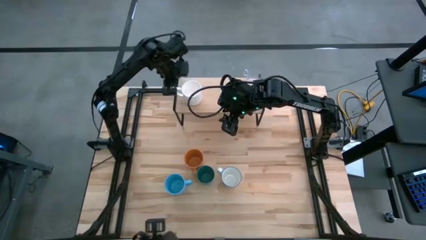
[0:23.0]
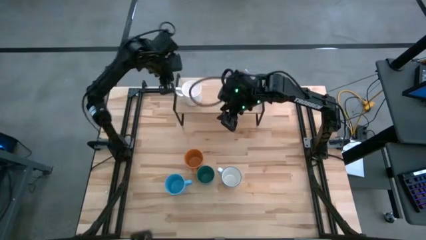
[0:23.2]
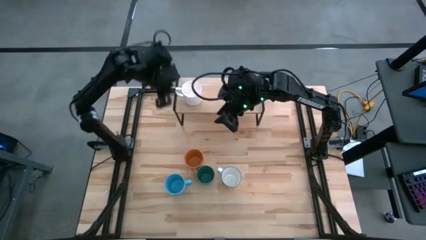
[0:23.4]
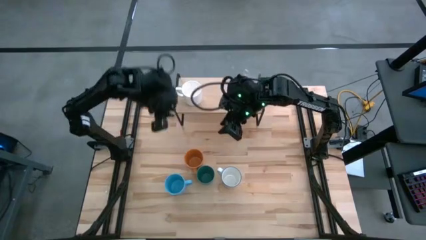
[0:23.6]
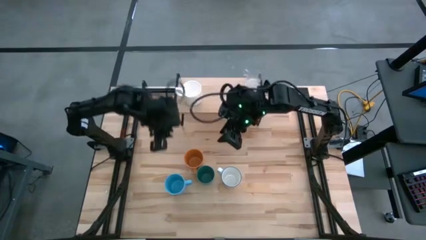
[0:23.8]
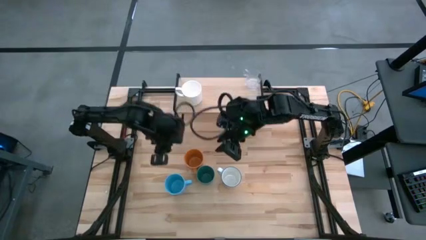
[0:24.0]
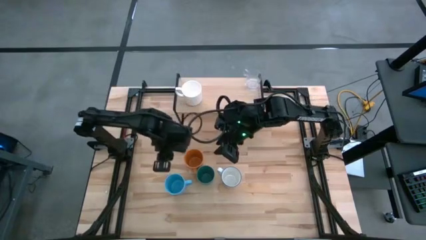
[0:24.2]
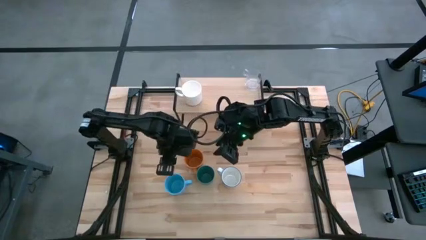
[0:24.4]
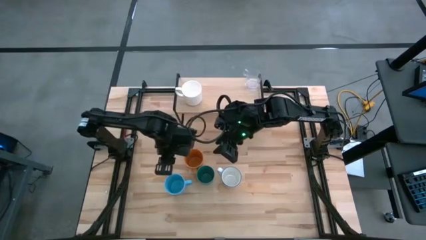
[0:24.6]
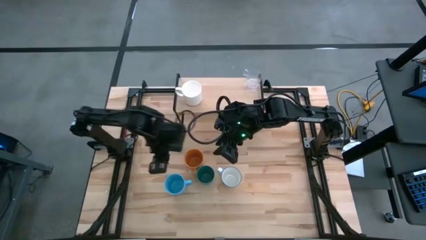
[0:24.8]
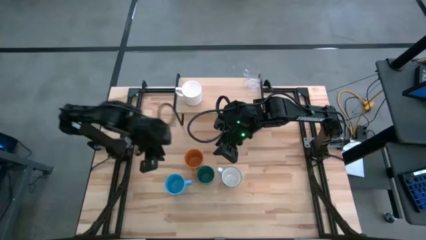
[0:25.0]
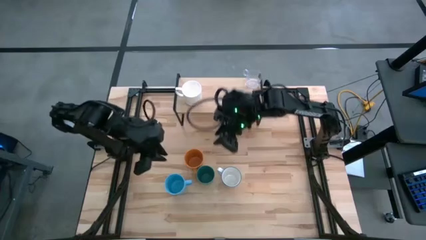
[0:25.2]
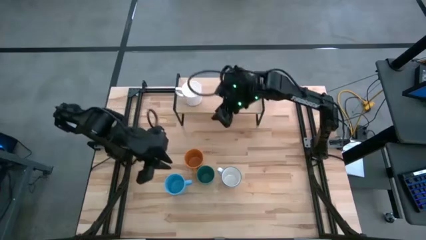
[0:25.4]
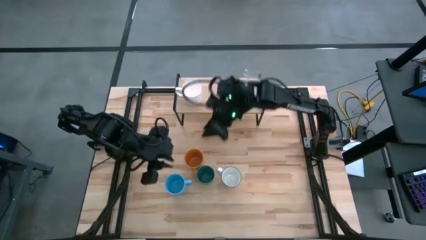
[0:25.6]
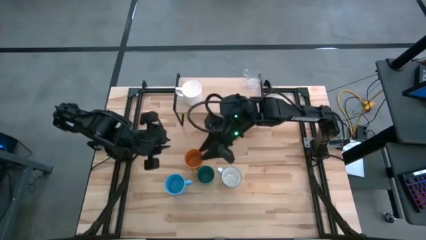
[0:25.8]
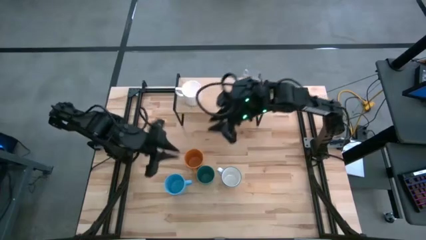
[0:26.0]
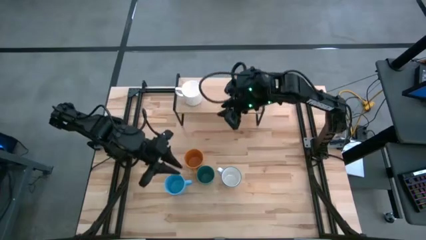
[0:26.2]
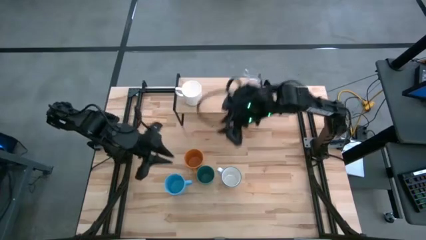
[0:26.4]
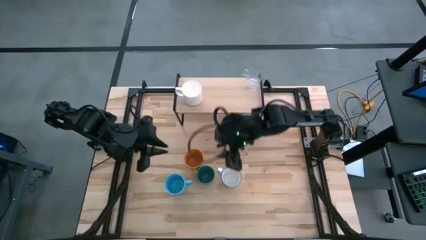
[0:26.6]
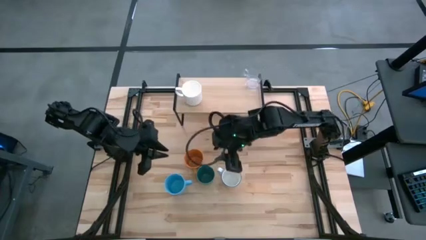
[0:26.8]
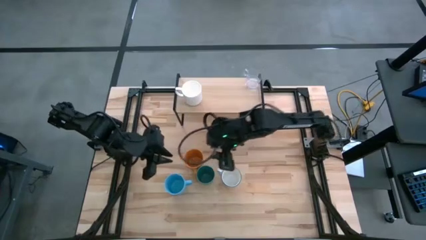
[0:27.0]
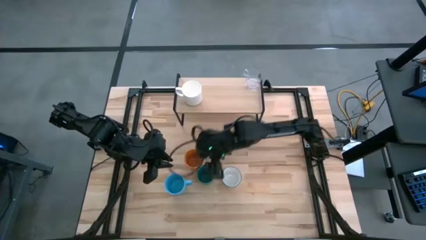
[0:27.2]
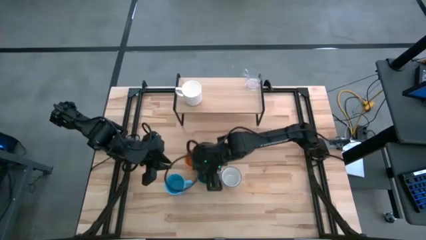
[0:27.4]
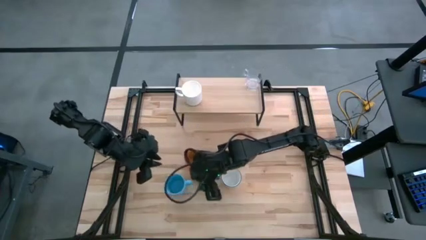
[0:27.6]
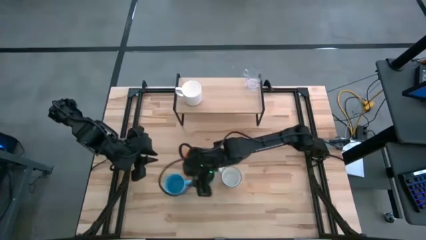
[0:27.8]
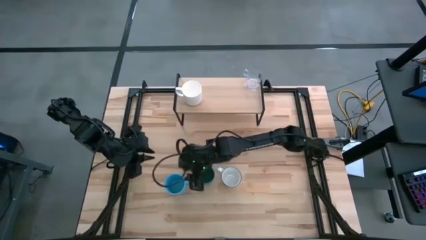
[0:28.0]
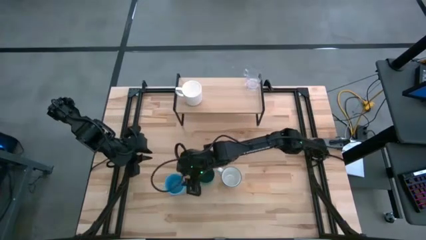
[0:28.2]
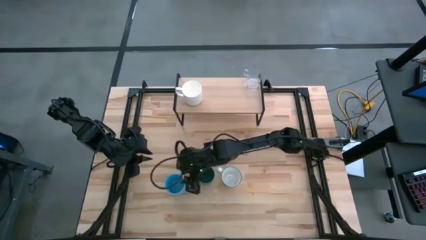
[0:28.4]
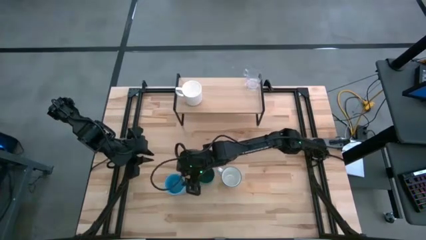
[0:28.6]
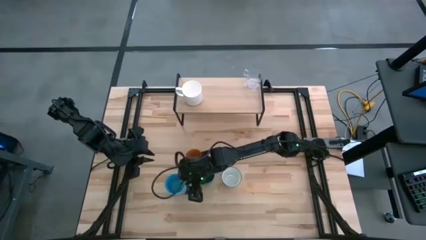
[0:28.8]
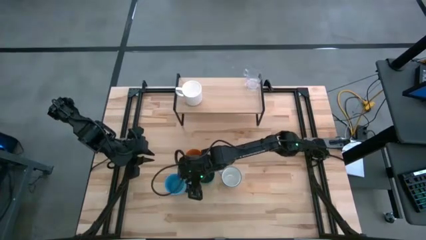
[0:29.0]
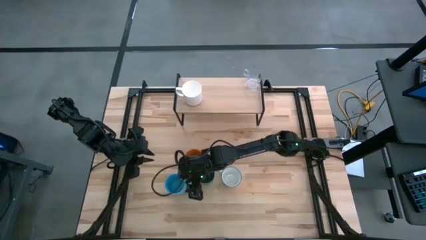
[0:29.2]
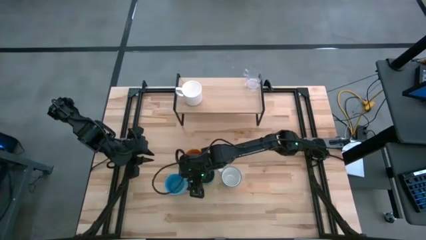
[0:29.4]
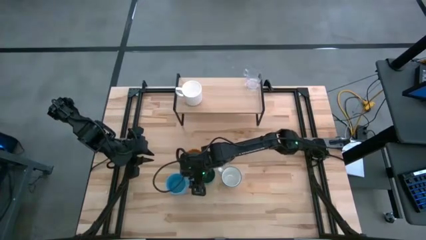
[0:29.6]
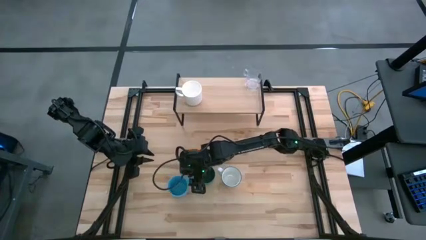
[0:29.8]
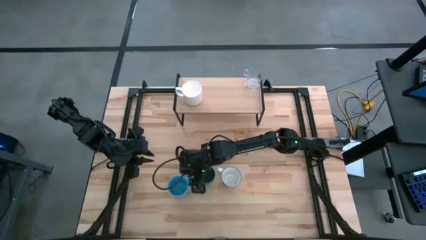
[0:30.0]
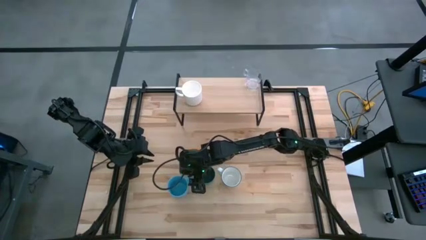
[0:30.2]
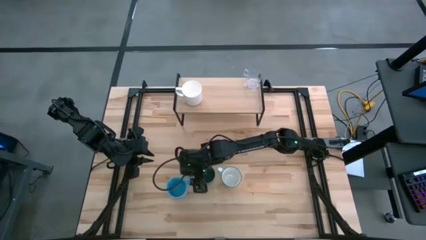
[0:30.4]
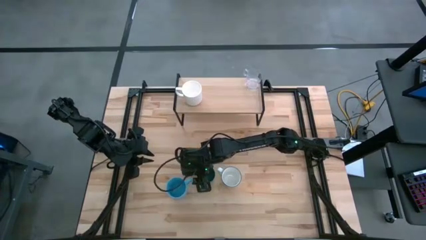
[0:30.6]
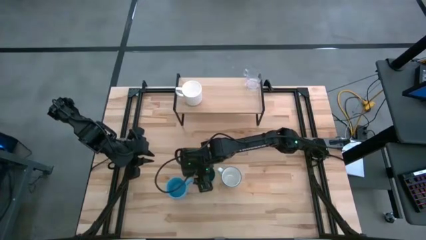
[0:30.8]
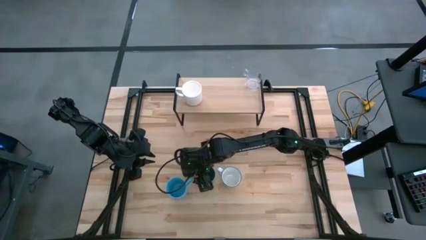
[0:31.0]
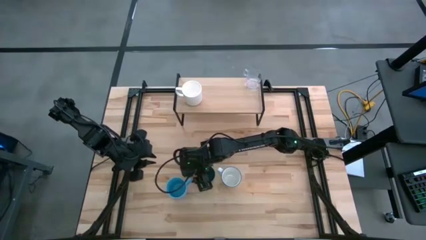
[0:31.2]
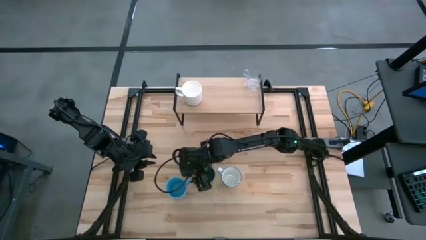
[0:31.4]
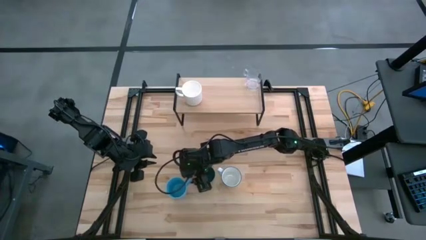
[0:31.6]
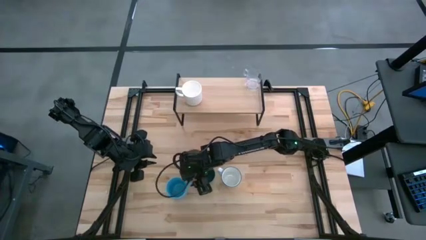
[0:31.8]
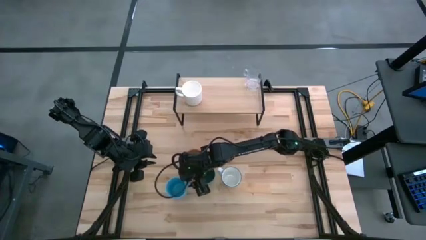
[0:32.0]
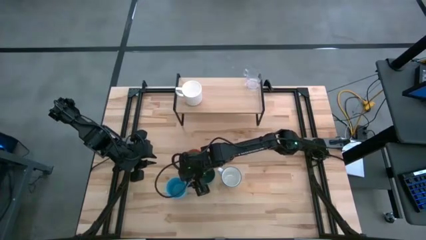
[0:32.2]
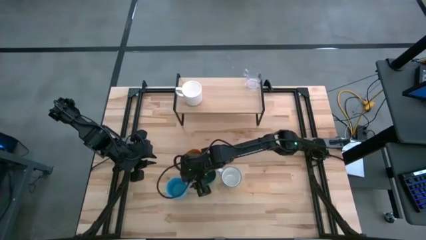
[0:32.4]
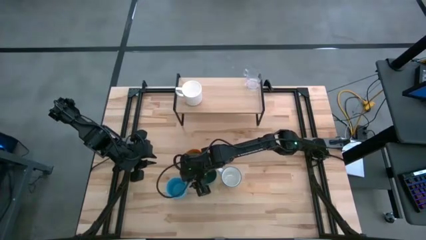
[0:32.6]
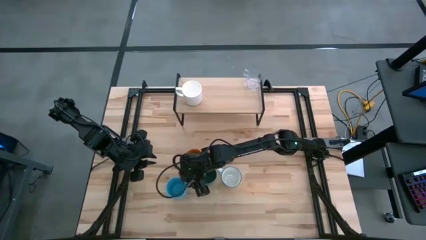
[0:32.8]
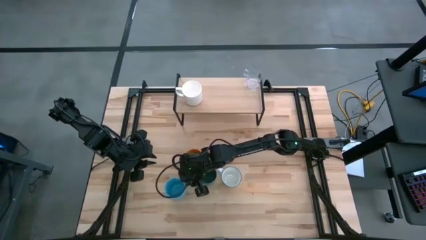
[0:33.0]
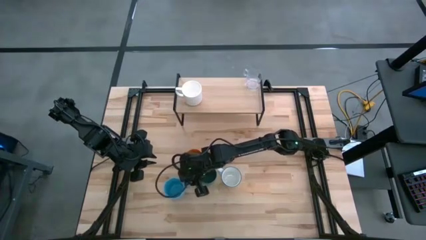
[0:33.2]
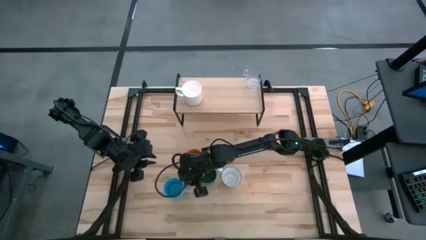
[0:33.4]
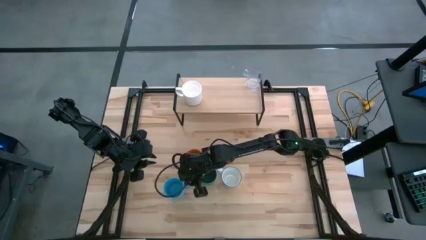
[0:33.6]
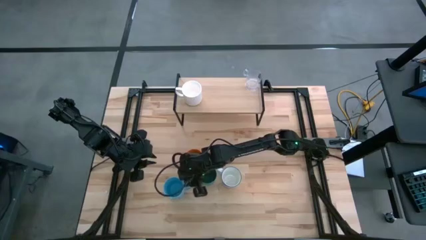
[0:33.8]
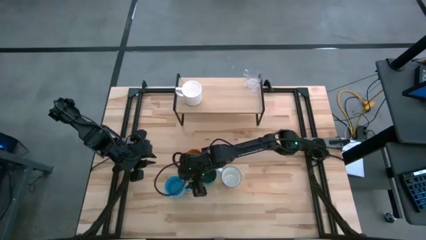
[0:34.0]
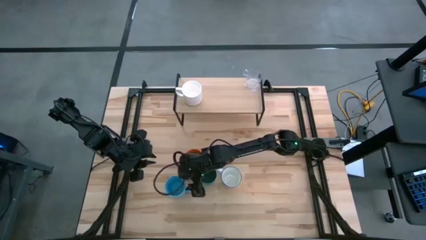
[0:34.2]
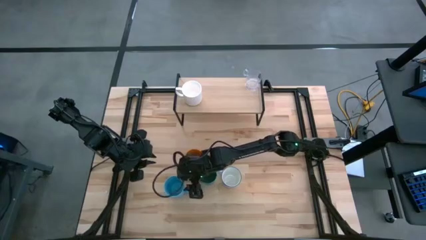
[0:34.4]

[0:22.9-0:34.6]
Task: Stack small to large cups/mugs on shelf
Put the blue mug on the shelf

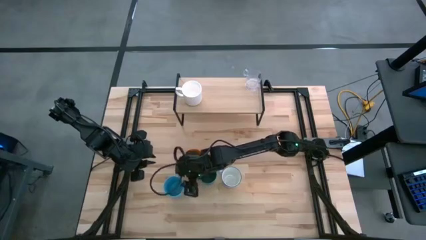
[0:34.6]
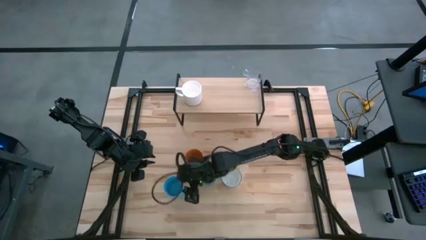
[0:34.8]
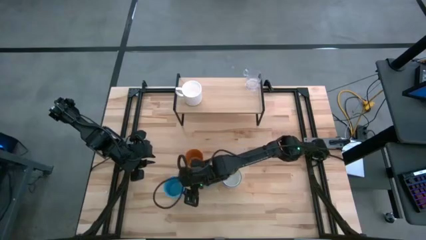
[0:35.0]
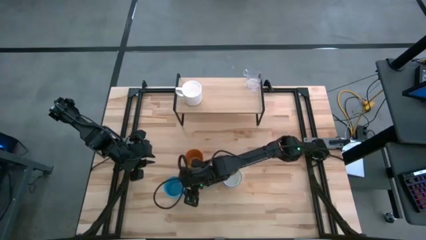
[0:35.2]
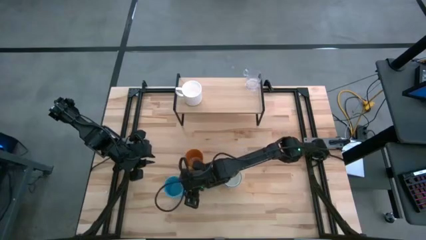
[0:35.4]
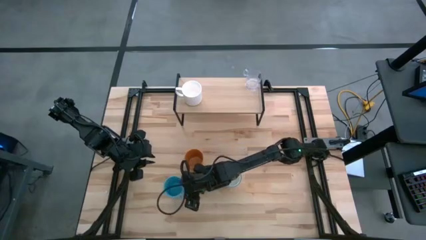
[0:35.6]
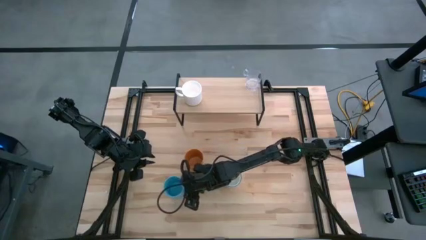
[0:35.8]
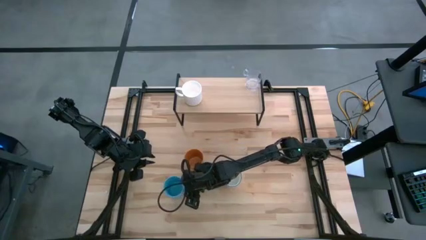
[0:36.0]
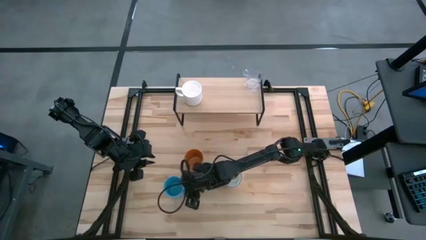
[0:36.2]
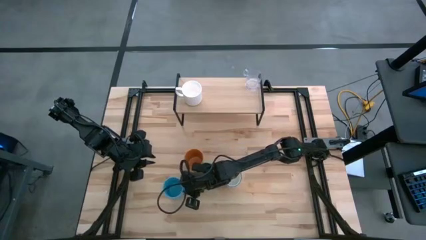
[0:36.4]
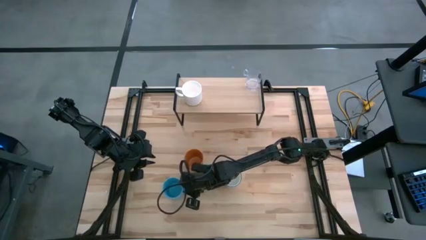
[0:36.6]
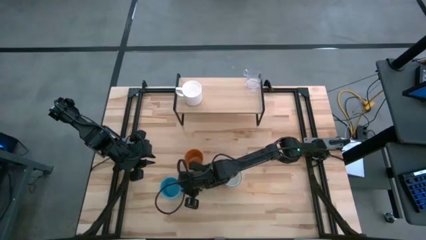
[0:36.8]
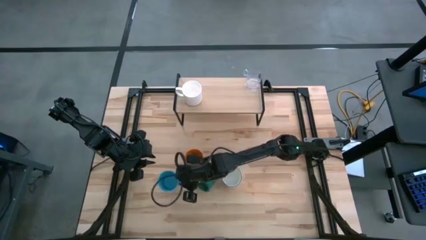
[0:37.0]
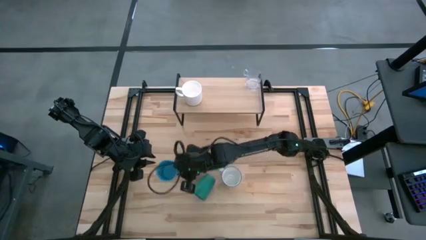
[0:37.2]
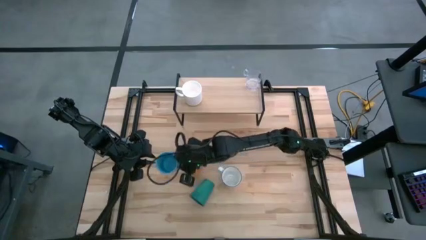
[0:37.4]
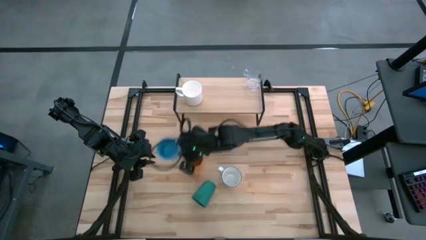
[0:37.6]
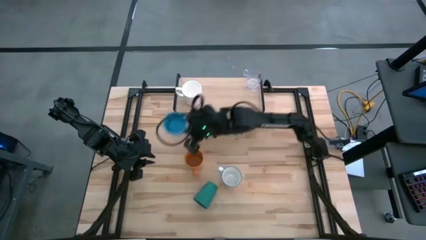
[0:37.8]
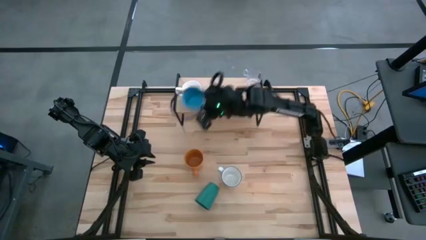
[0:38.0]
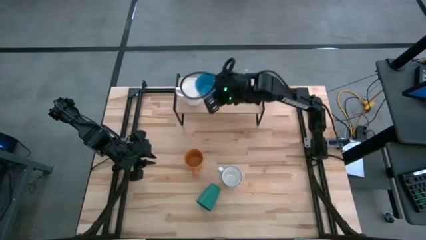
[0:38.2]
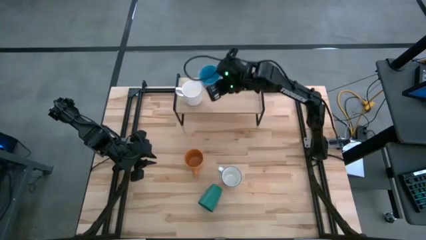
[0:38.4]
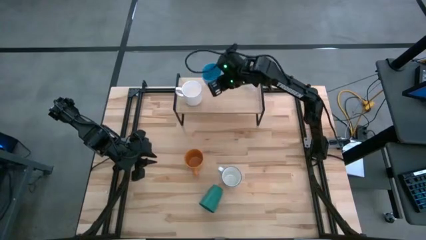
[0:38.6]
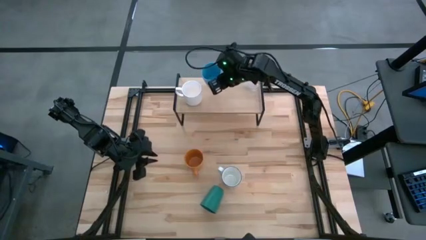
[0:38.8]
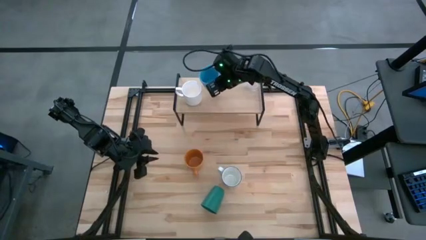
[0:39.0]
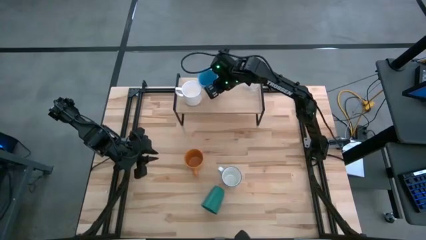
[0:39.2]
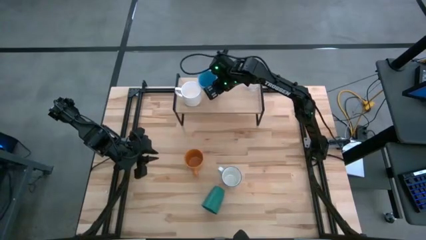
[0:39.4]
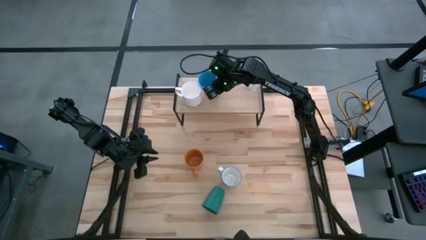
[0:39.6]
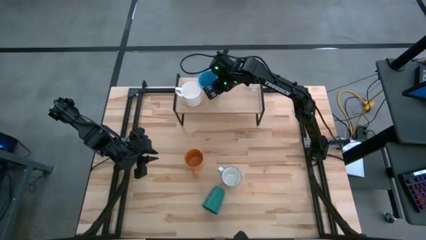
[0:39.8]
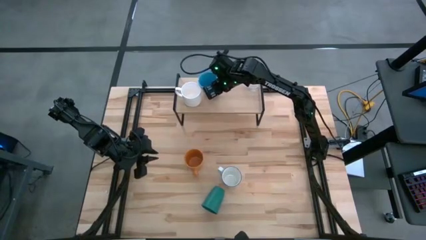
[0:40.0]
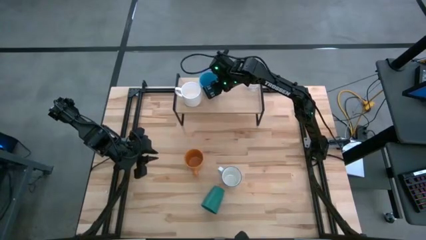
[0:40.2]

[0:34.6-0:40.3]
Put the blue mug on the shelf
